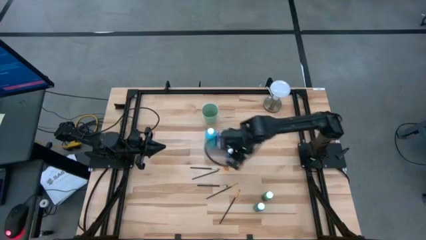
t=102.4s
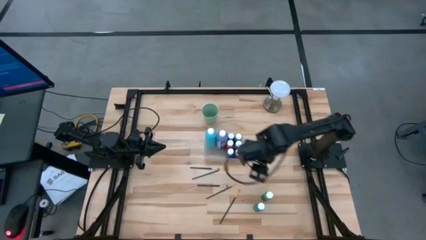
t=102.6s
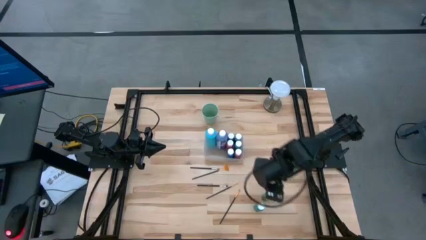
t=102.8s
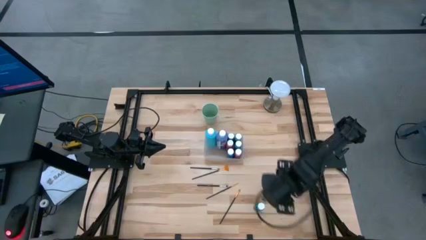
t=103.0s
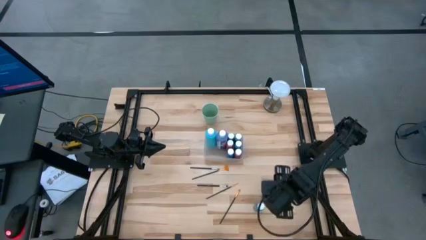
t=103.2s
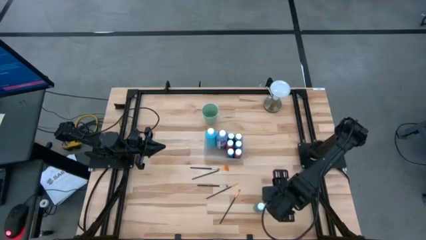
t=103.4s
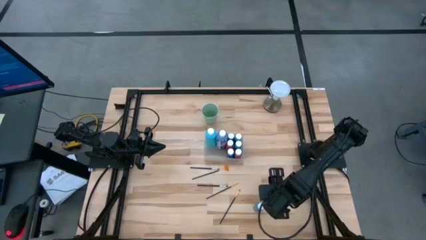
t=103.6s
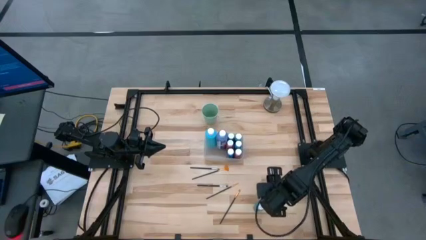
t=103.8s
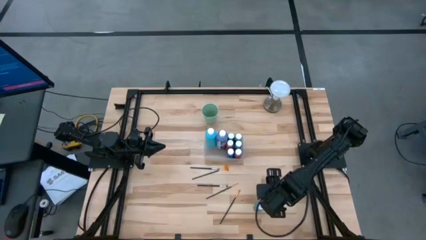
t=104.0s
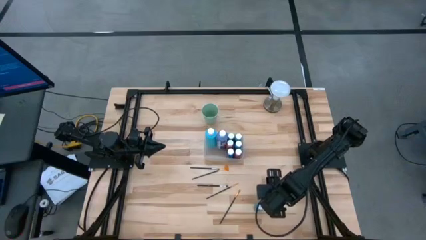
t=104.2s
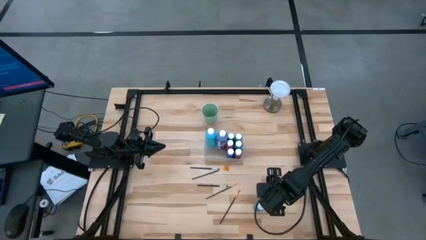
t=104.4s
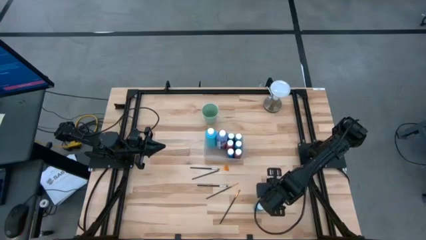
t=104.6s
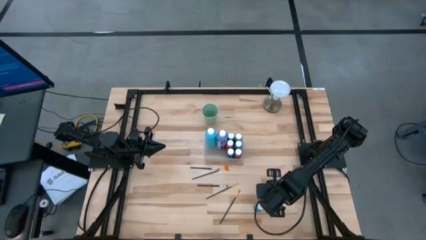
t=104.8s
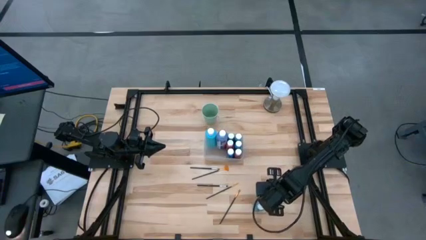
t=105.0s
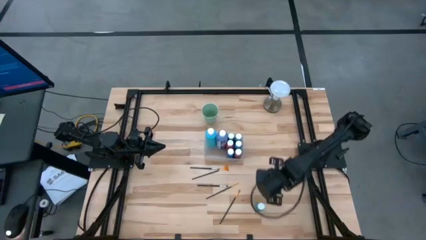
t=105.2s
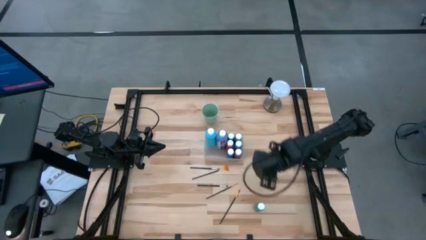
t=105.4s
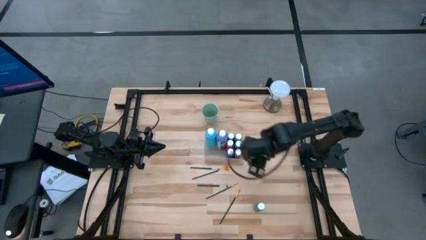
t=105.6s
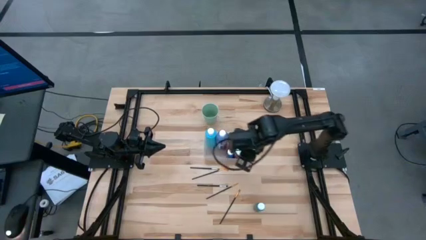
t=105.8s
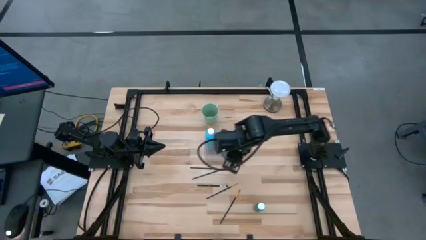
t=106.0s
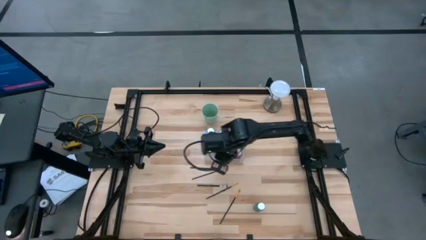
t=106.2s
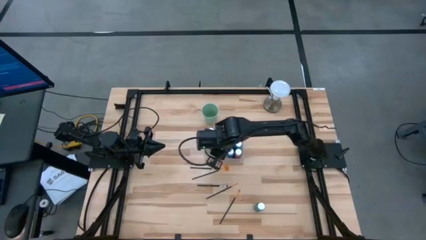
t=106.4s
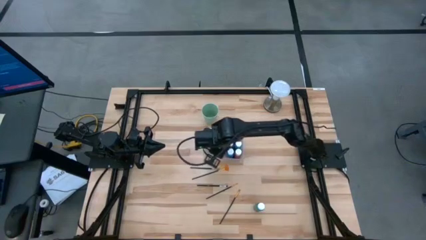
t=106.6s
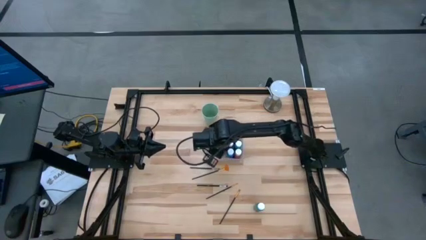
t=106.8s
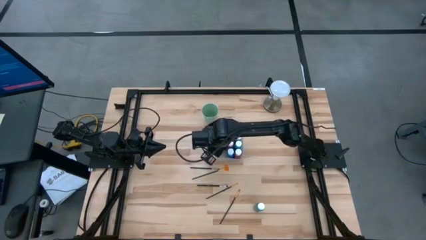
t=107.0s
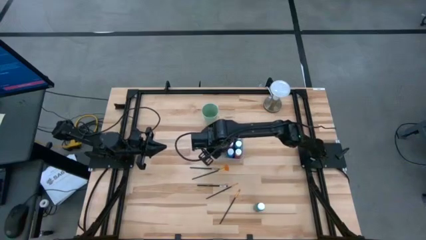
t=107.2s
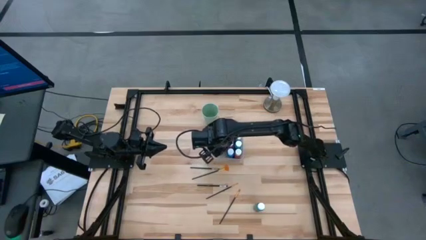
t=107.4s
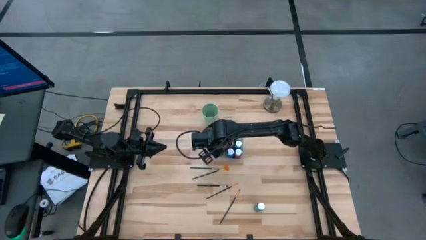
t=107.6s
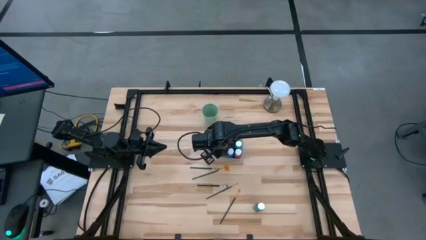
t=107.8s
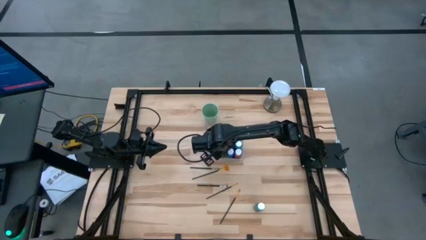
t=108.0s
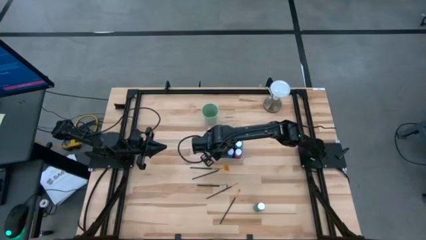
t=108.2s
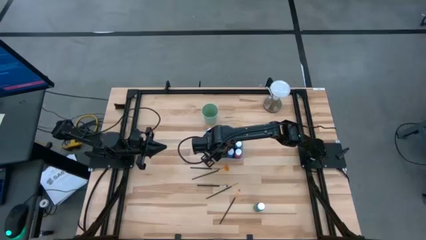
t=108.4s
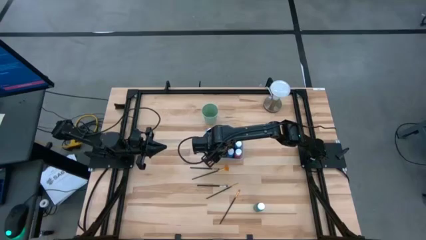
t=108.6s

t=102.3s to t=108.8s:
Task: Pick & Place Paint Supplies
Put the green paint bottle into the transparent bin

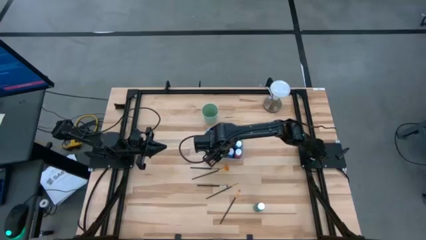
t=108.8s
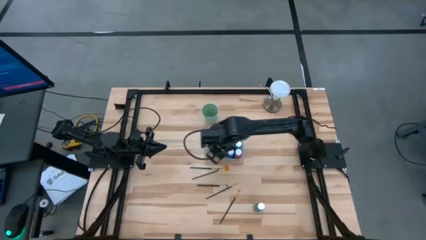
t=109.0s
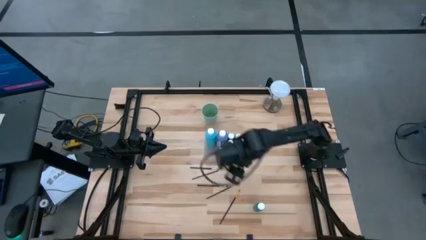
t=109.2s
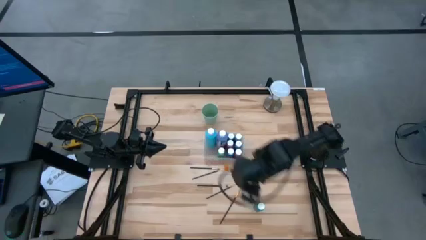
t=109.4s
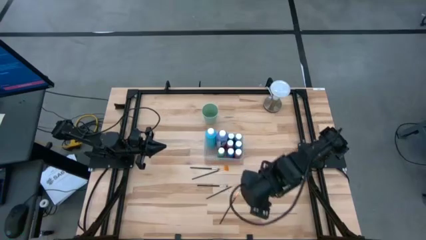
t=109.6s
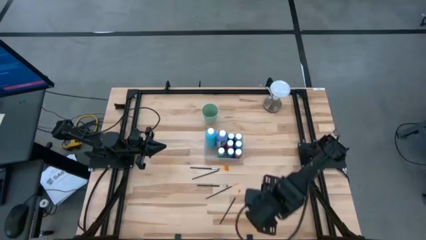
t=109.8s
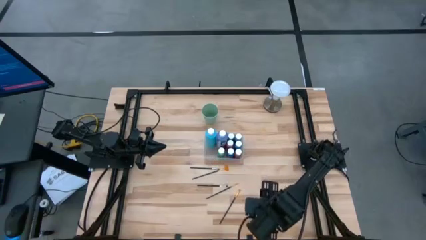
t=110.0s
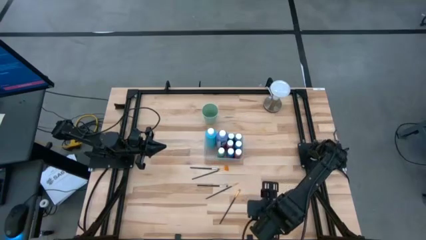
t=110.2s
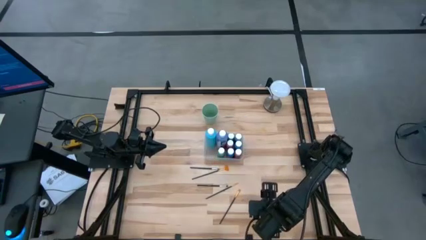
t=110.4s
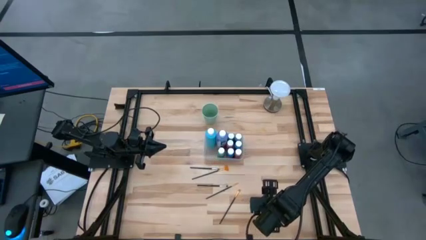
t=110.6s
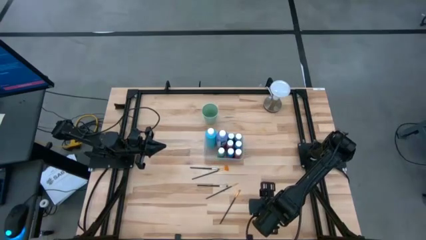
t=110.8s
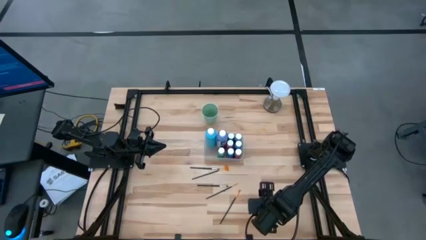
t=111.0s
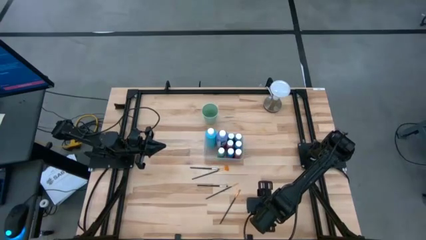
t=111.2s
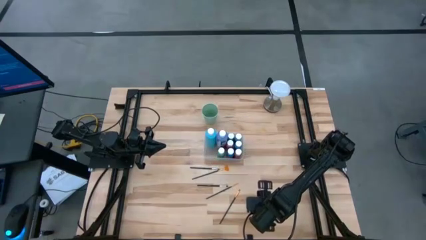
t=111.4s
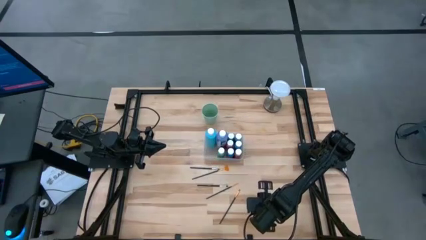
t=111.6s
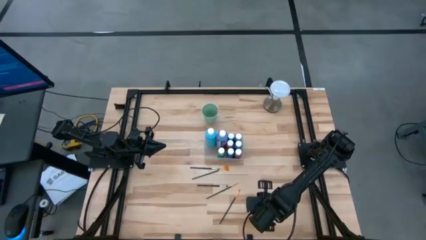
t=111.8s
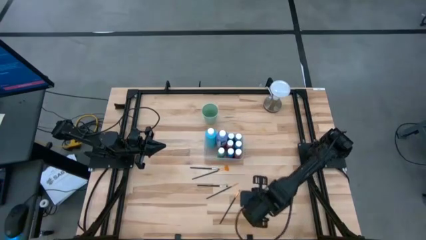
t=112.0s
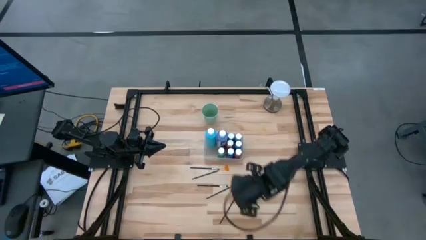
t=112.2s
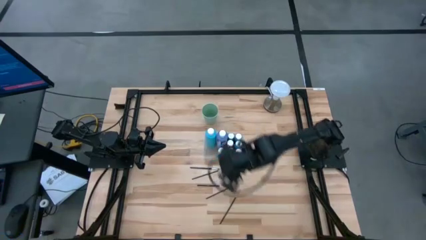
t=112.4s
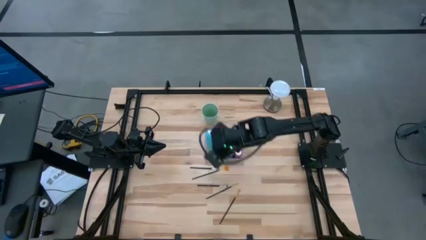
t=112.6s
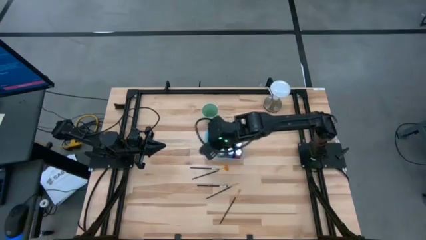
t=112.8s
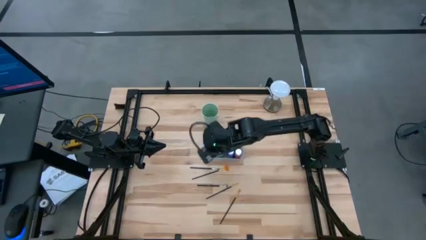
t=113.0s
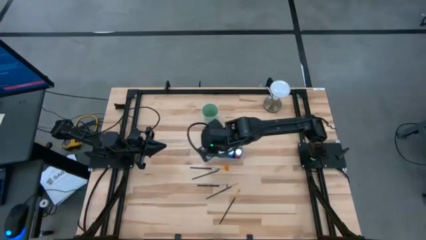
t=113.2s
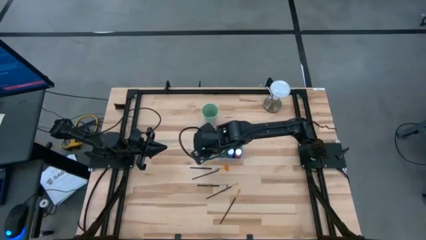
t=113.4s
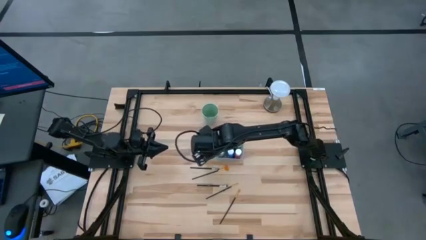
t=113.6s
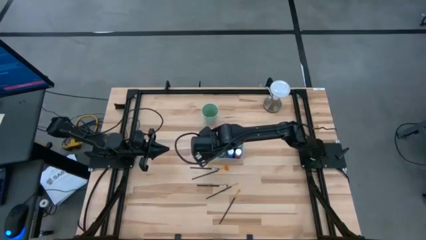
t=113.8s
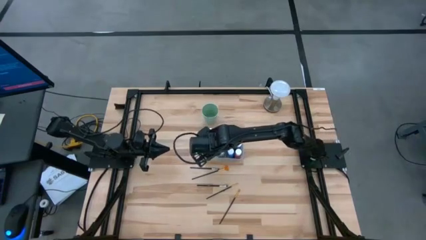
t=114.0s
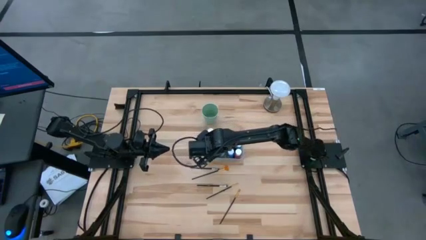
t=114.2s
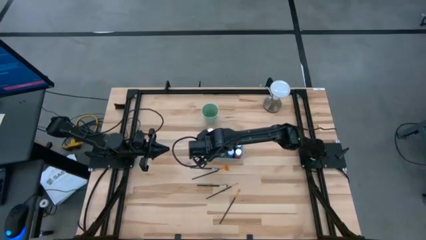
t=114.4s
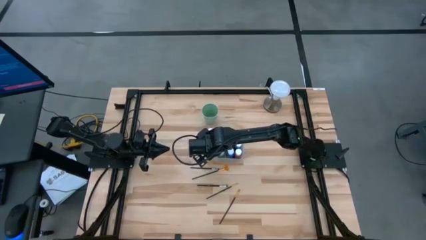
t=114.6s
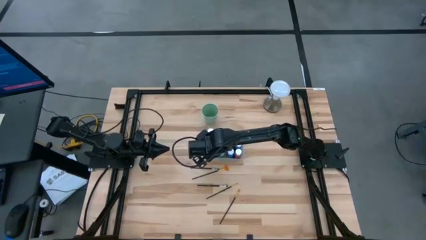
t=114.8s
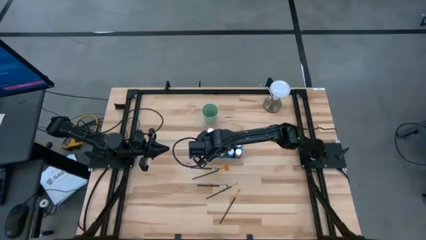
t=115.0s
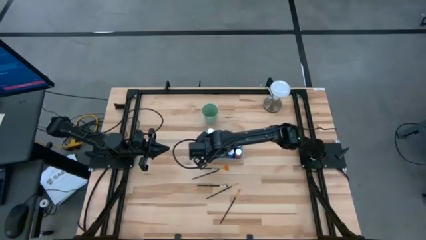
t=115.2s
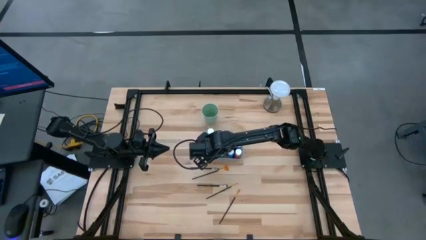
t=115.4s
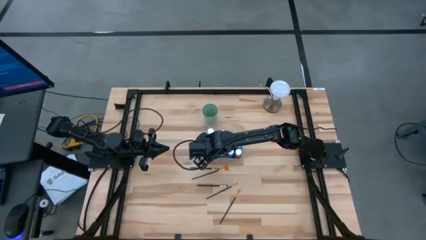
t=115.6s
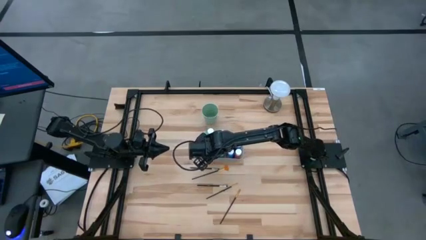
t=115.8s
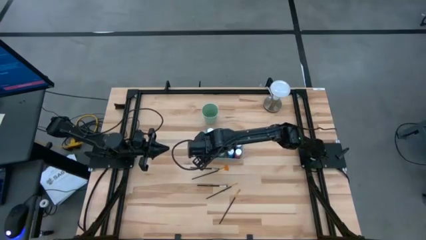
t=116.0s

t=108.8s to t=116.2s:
Put the light green paint bottle into the transparent bin

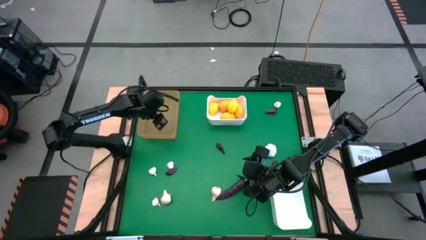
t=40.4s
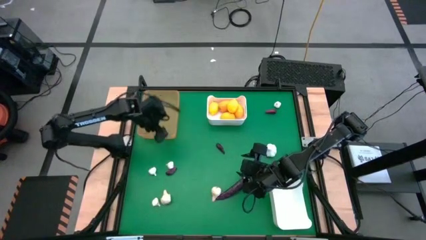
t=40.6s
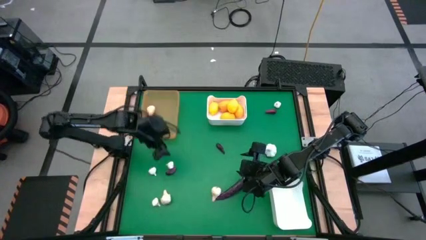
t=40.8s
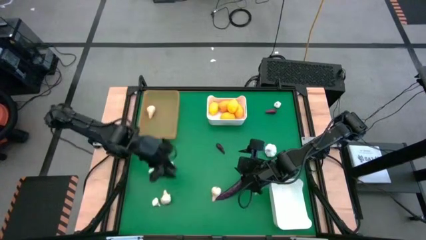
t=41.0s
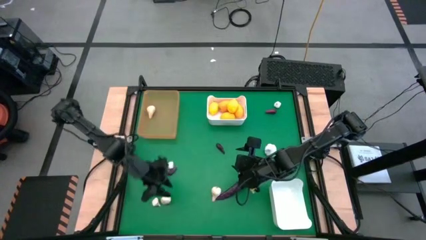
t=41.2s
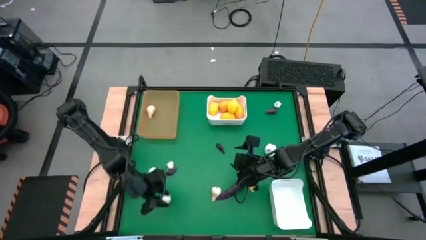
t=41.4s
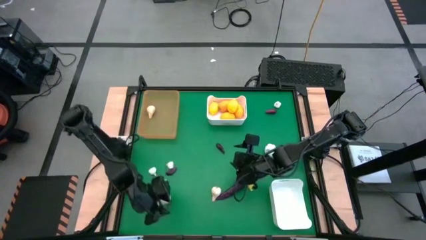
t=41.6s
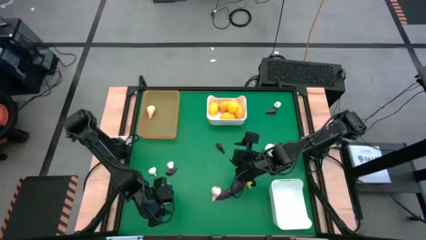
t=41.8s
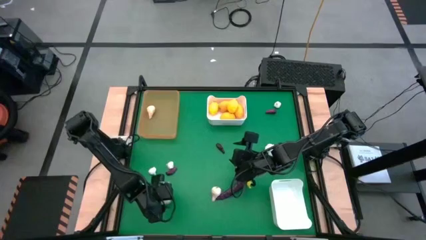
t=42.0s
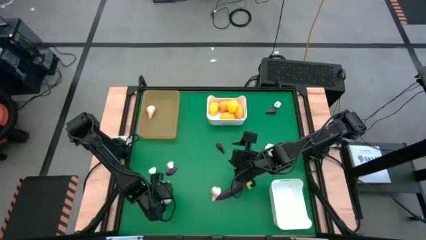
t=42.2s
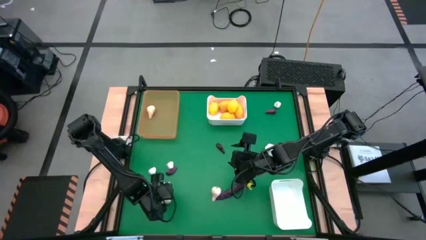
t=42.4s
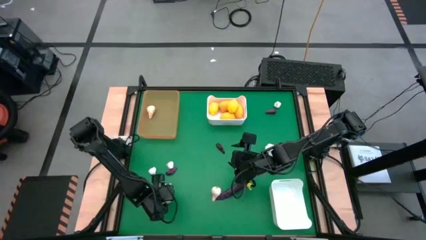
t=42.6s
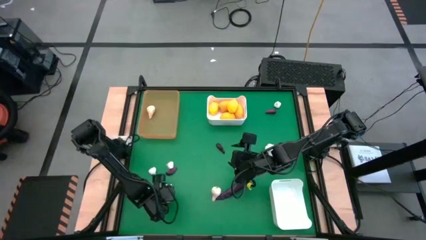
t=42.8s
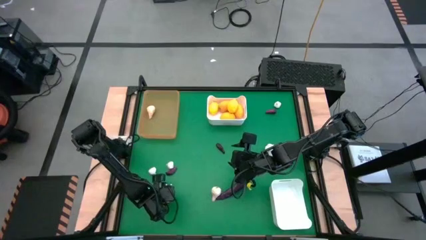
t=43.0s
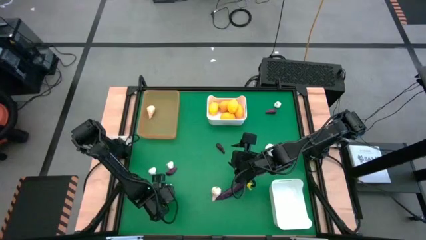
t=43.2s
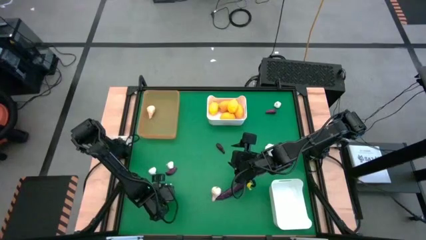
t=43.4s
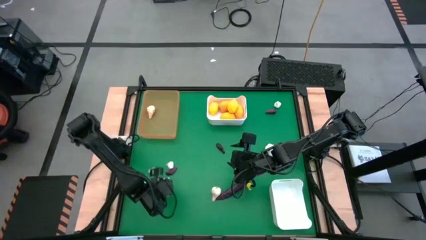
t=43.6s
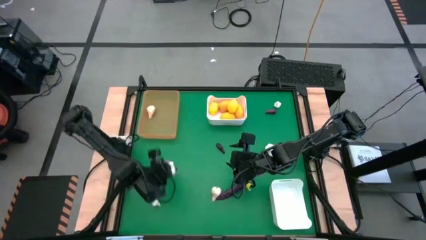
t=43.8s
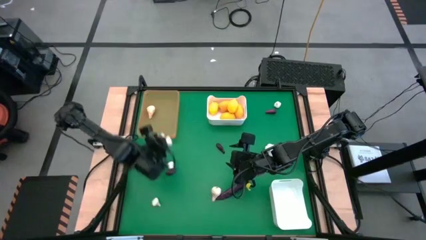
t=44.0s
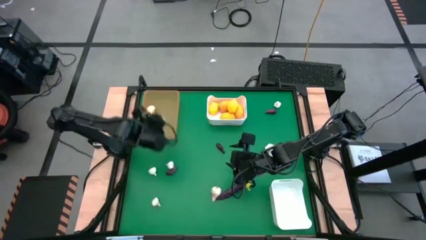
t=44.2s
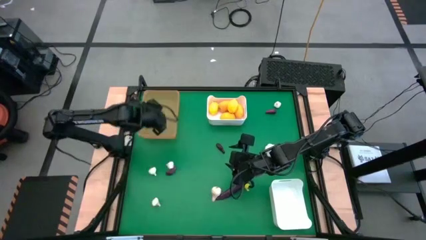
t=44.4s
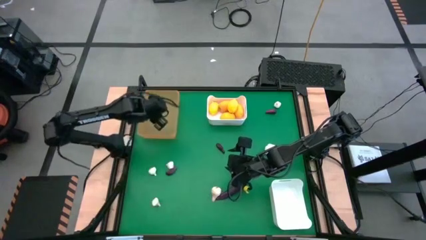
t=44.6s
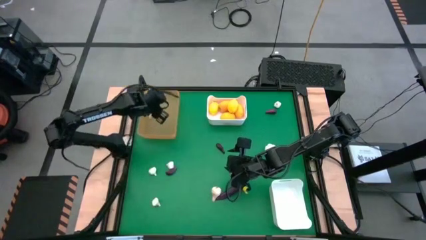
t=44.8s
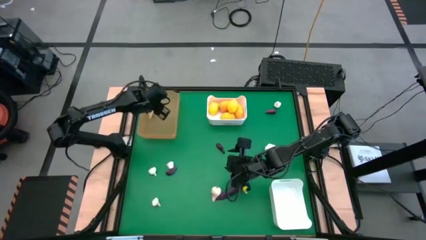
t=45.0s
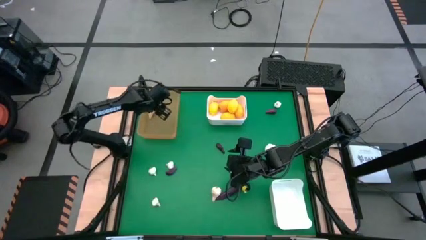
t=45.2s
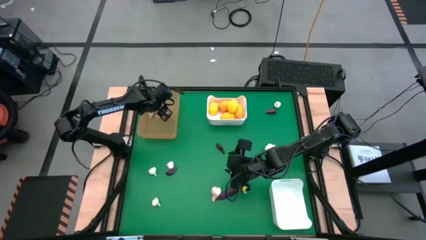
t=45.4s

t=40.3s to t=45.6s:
Task: Sort produce into baskets
Put the garlic into the orange bin
